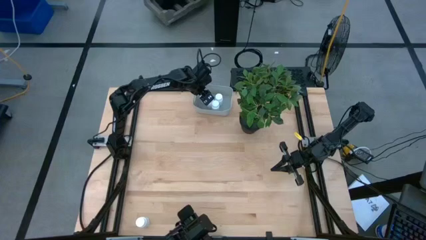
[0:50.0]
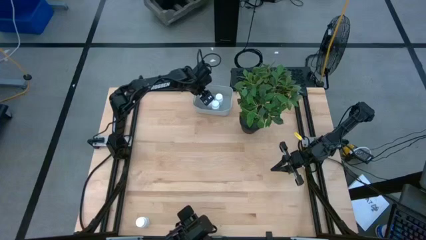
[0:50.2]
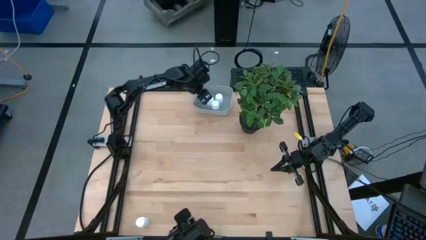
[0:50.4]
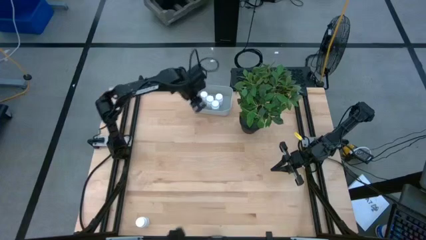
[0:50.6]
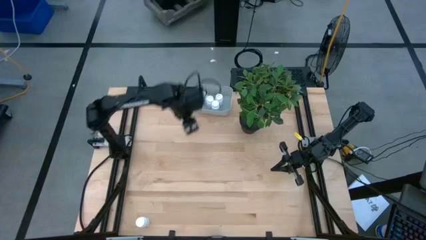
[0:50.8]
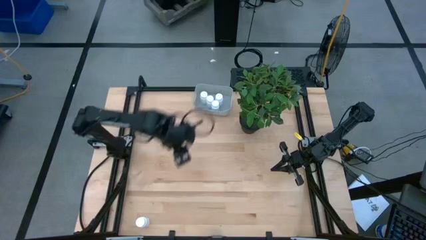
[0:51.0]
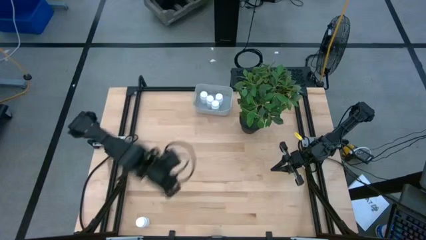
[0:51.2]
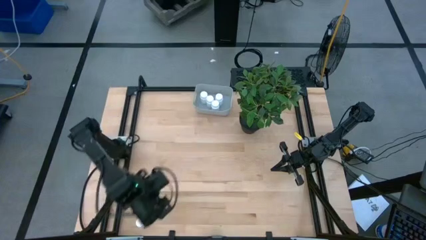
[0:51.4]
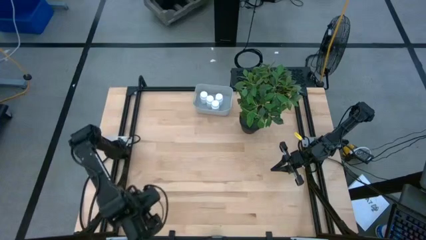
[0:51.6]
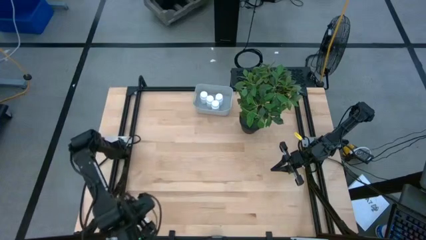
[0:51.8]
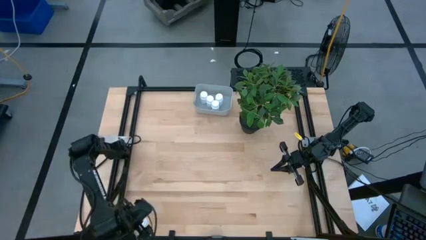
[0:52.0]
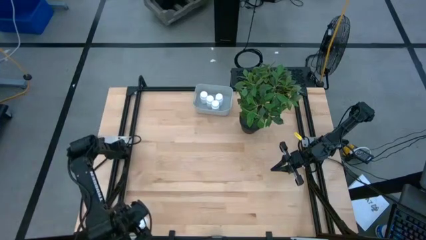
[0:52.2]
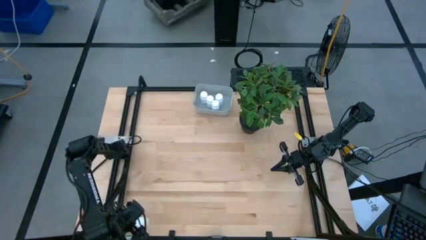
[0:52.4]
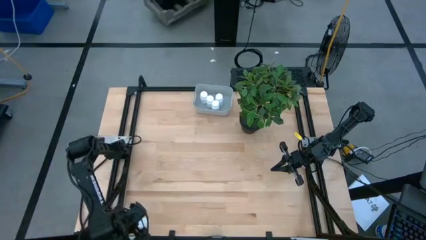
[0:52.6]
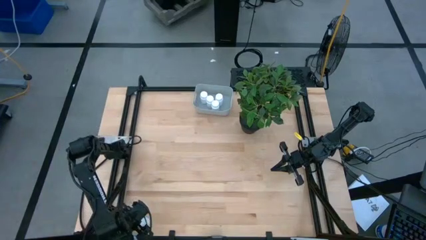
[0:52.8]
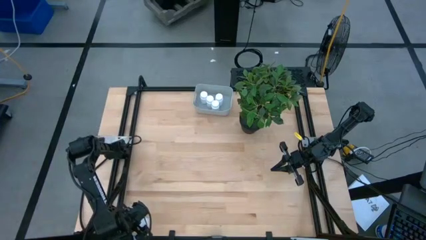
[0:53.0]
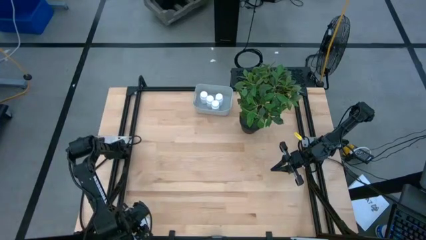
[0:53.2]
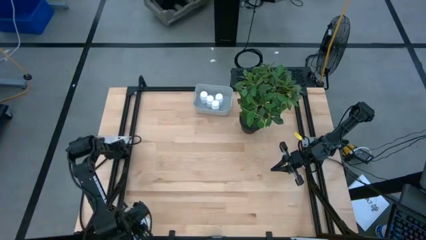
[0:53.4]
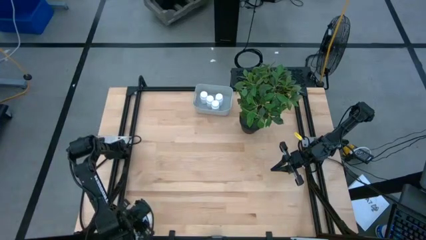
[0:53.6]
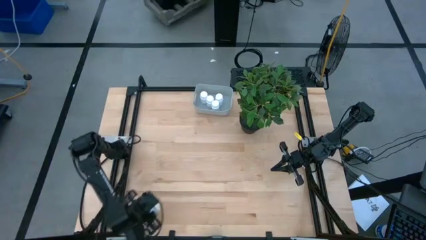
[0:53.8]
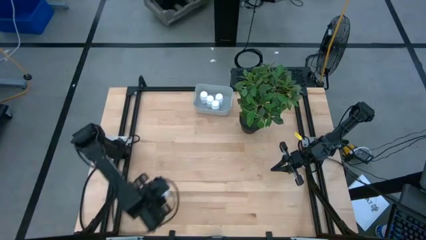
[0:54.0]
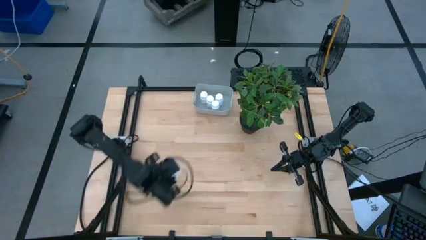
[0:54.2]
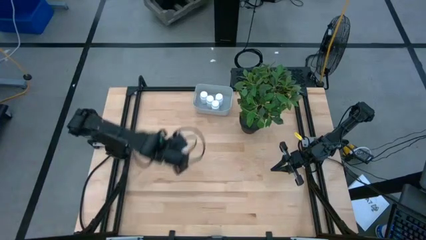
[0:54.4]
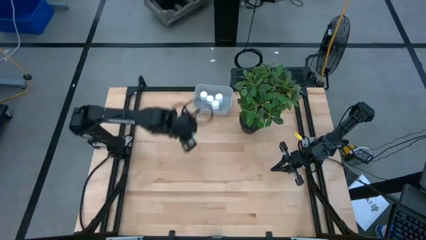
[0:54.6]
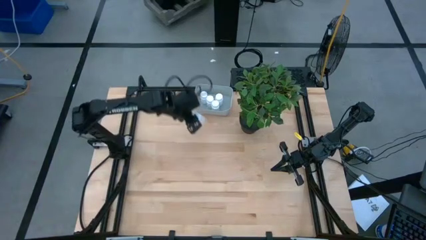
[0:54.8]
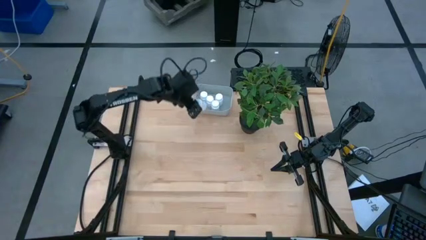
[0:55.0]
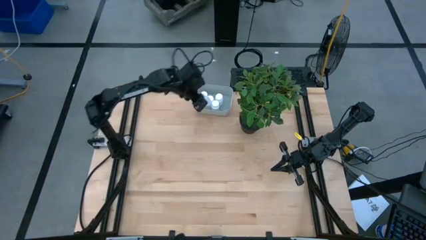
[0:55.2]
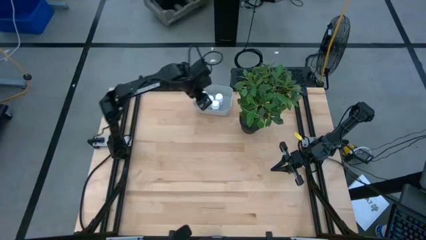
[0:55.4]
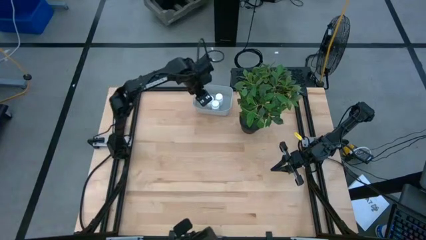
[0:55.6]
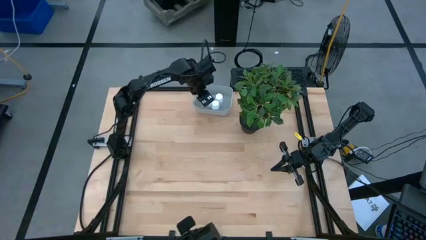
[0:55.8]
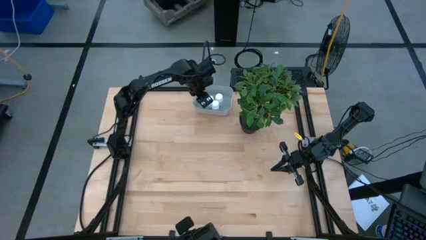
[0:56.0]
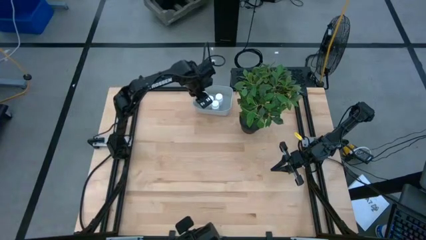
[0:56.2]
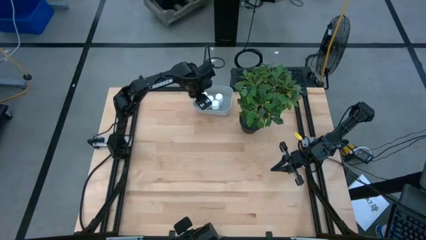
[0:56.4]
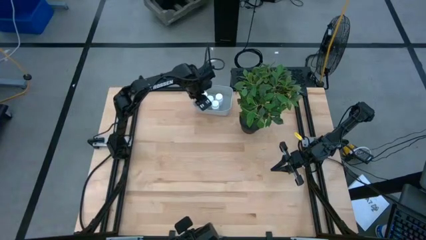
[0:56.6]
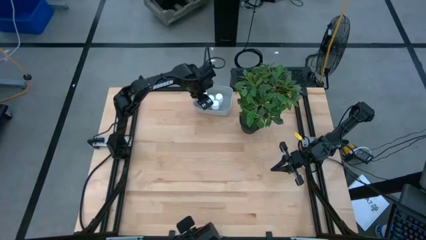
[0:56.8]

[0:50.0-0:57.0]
Task: Pick and place pill bottles into a basket
Put the white pill bottle into the gray bin

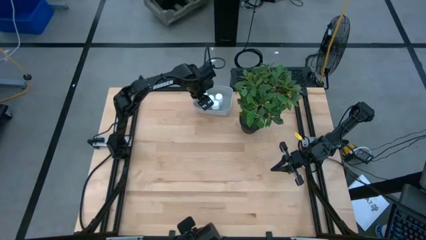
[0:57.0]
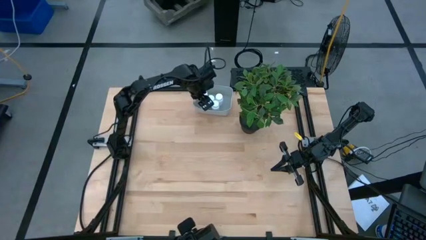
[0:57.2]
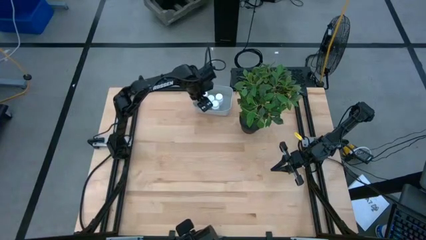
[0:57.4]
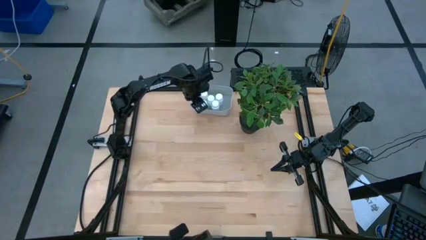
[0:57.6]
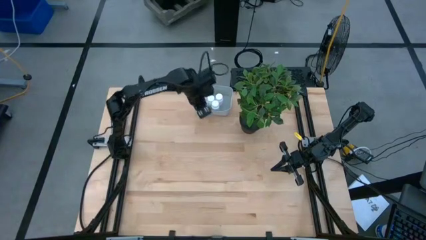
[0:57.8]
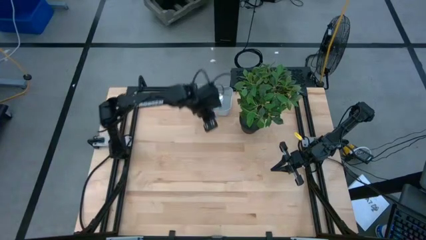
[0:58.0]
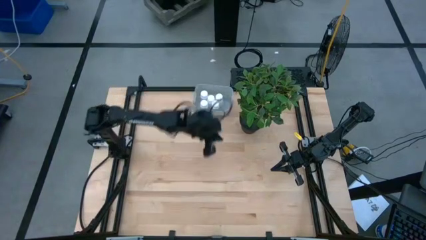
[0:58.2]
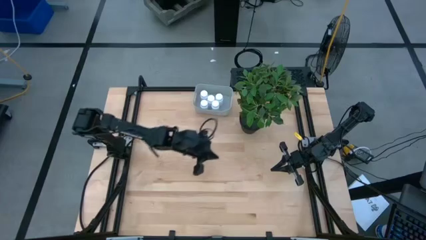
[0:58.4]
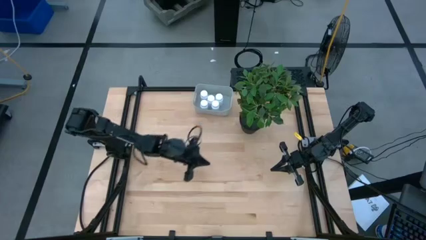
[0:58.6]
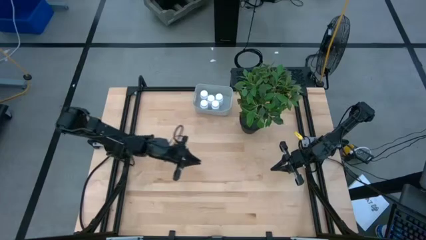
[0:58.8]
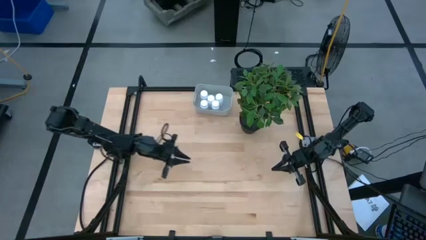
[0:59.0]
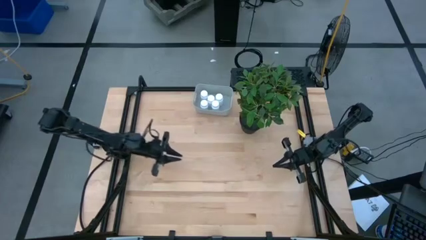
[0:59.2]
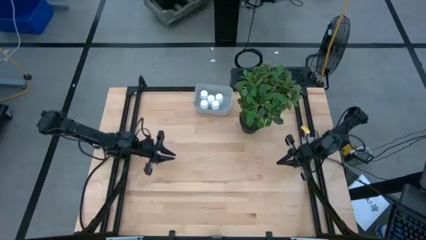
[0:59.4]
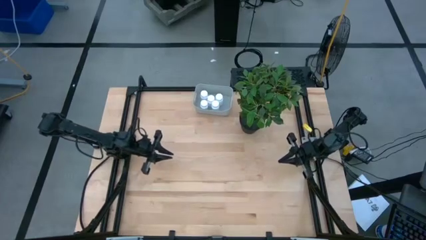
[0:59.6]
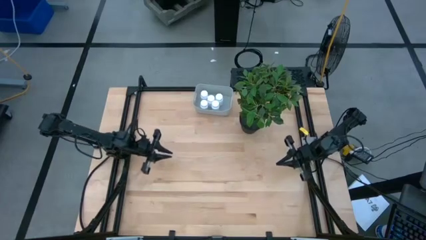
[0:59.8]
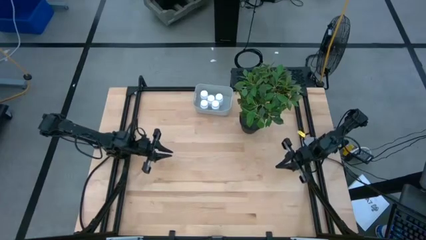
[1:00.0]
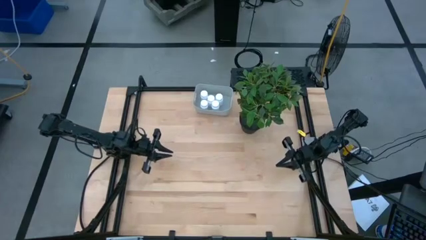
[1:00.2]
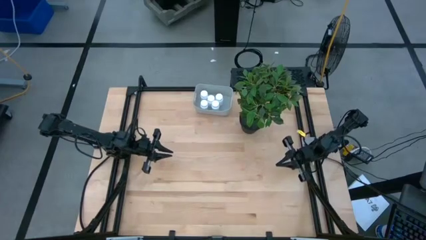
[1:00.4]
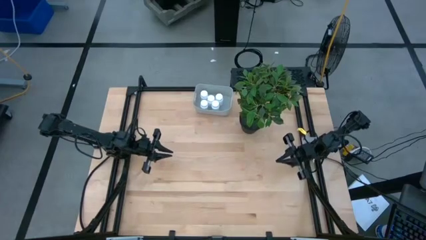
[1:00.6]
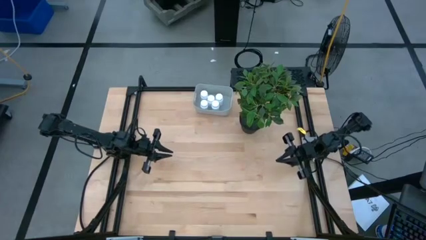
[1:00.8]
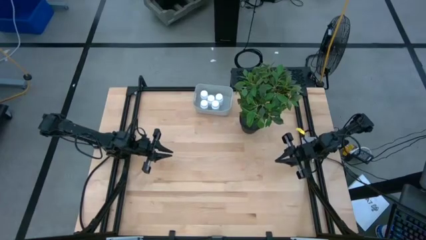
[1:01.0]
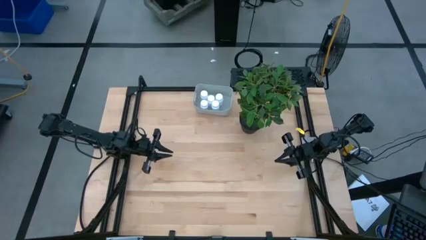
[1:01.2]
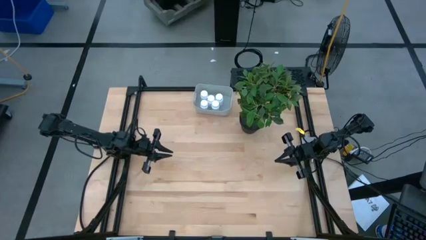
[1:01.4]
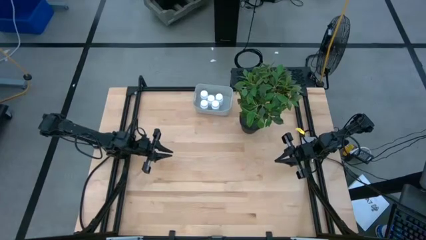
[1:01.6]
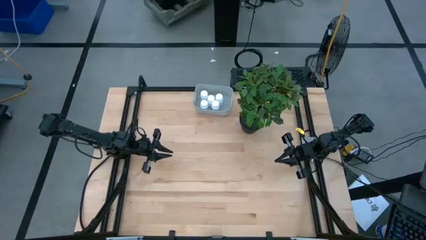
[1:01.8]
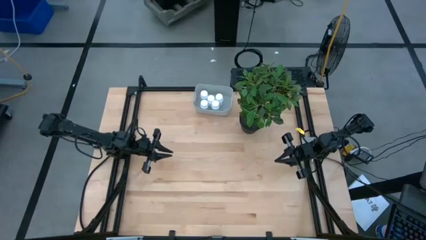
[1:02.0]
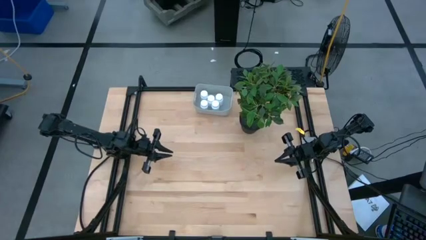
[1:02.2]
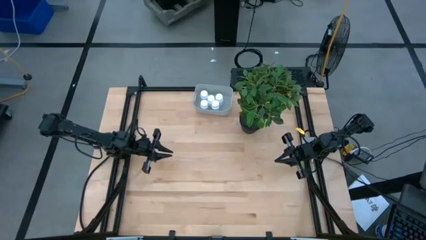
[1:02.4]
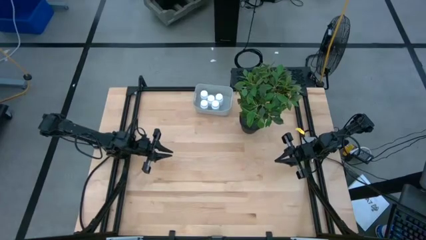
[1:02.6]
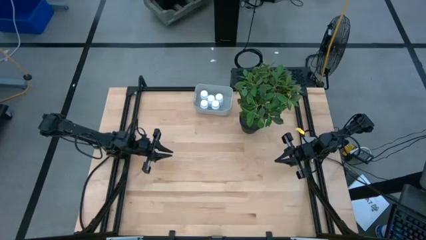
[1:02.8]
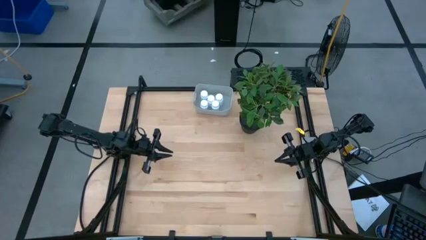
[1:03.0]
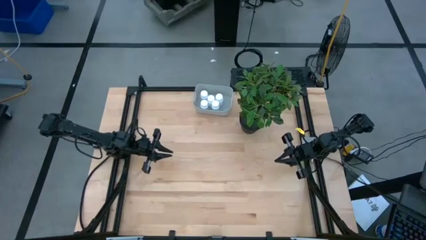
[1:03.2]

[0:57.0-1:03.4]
Return to Home Position
